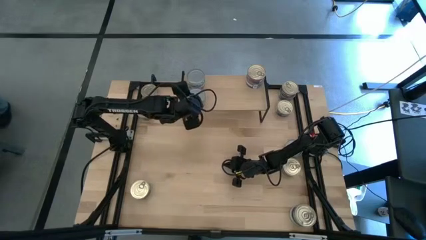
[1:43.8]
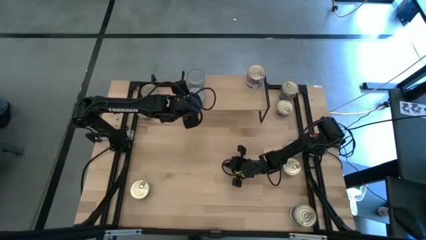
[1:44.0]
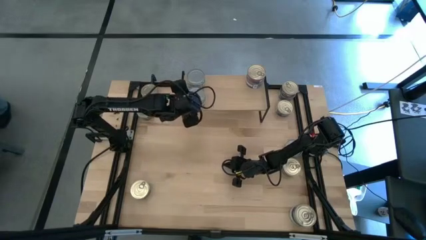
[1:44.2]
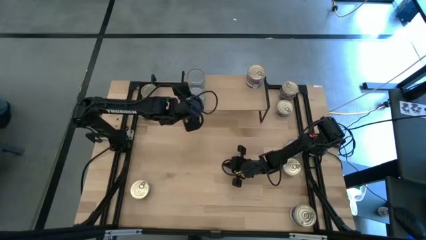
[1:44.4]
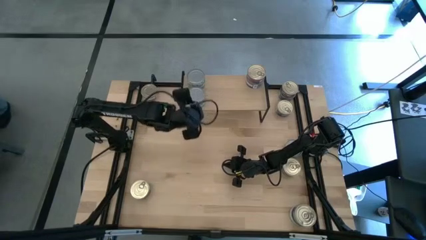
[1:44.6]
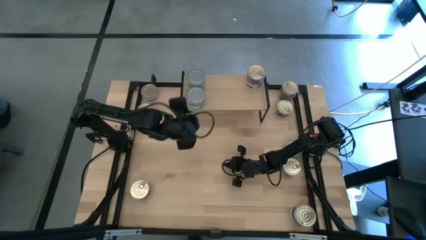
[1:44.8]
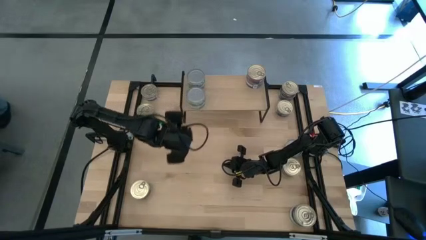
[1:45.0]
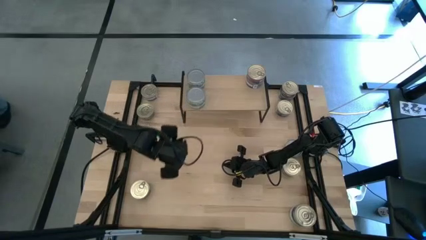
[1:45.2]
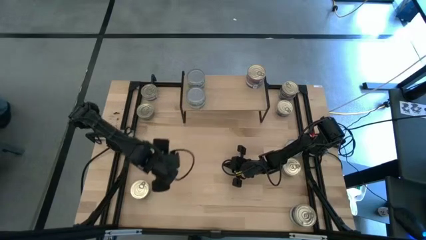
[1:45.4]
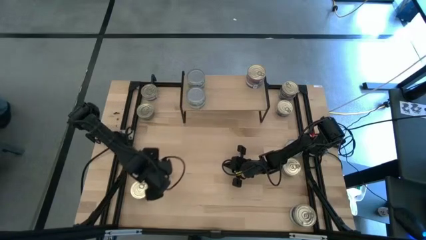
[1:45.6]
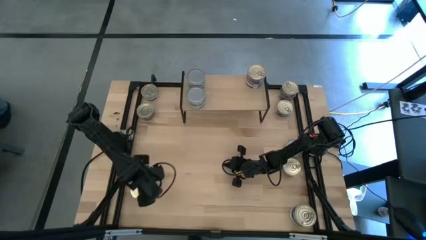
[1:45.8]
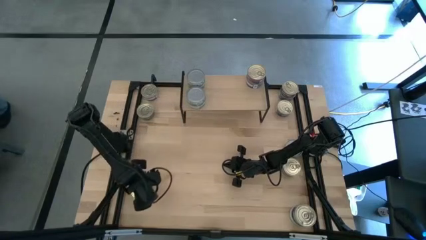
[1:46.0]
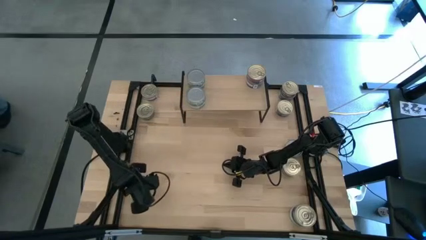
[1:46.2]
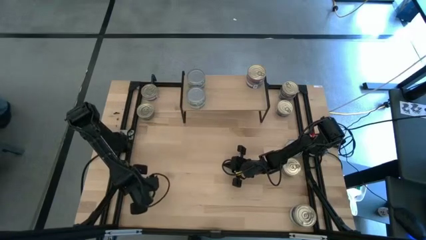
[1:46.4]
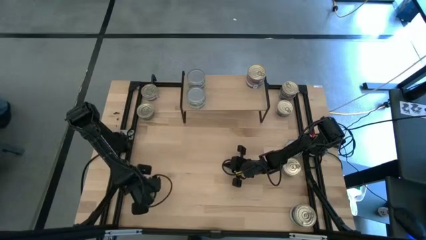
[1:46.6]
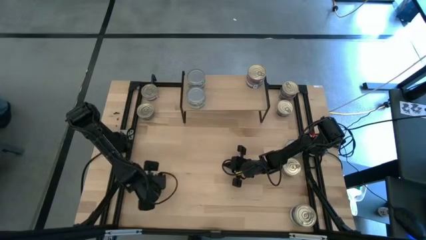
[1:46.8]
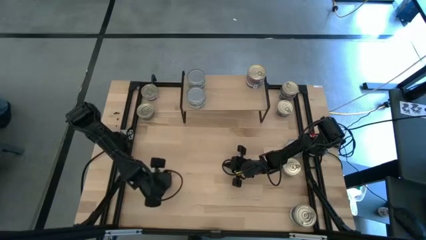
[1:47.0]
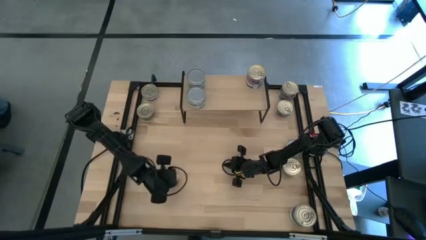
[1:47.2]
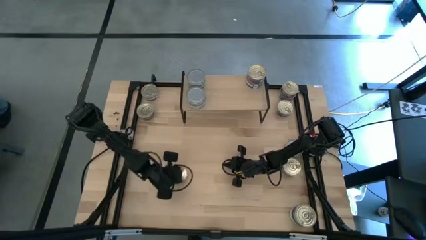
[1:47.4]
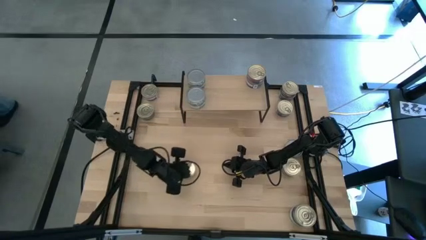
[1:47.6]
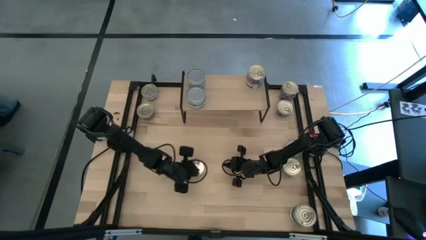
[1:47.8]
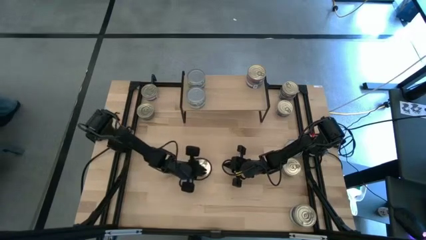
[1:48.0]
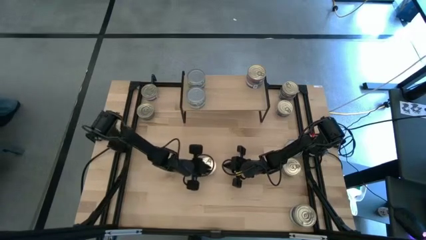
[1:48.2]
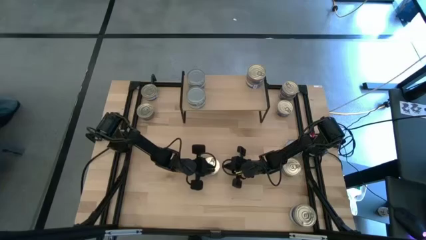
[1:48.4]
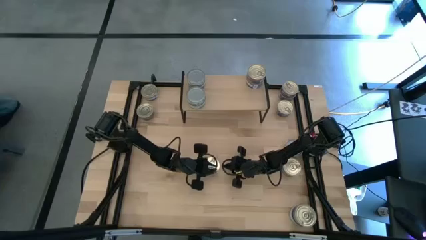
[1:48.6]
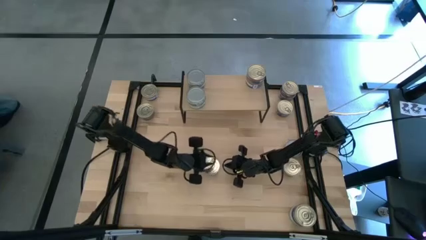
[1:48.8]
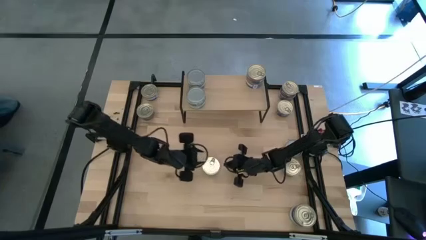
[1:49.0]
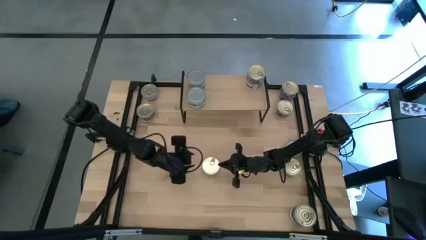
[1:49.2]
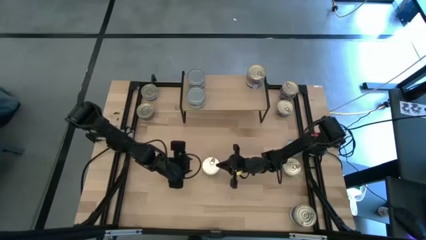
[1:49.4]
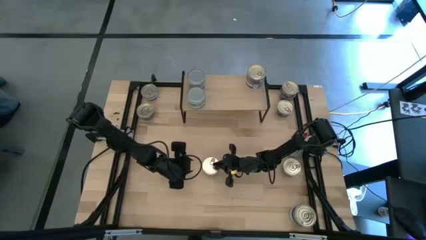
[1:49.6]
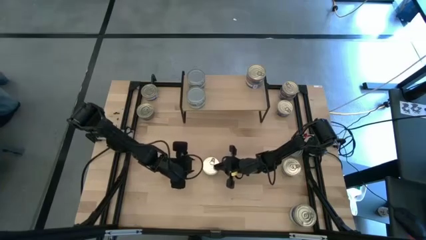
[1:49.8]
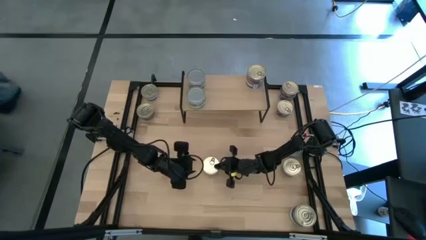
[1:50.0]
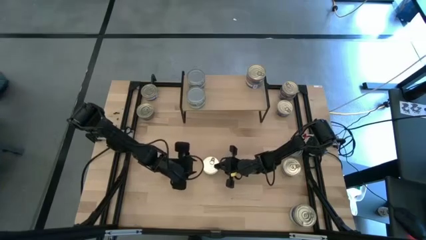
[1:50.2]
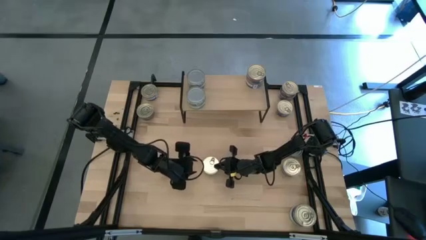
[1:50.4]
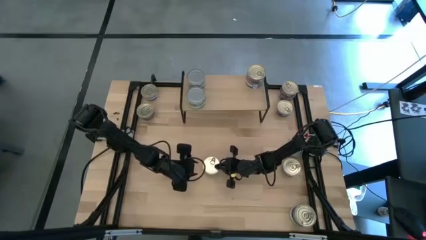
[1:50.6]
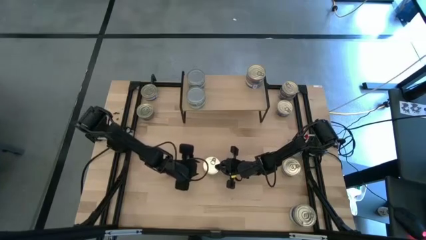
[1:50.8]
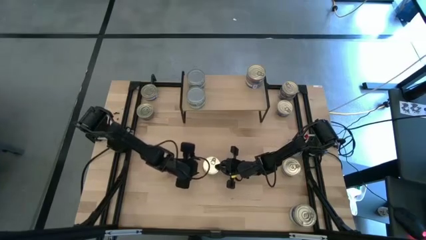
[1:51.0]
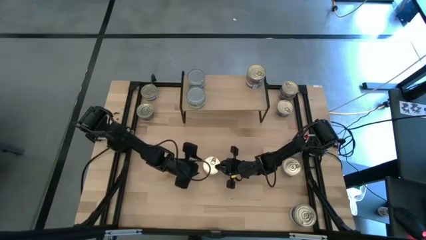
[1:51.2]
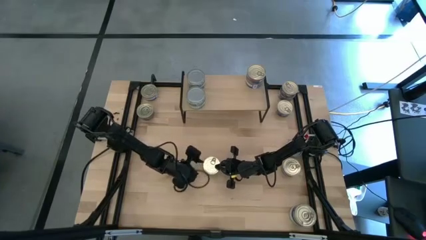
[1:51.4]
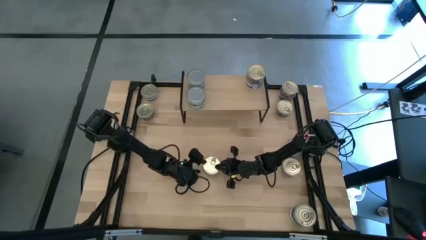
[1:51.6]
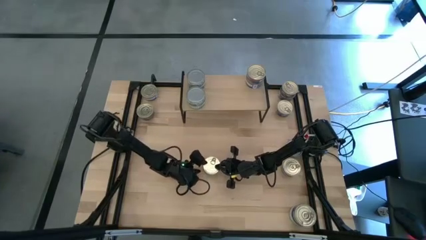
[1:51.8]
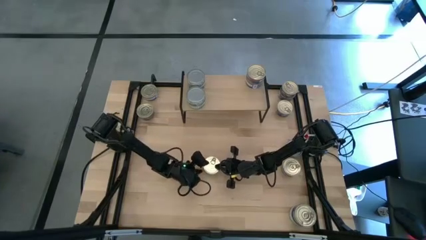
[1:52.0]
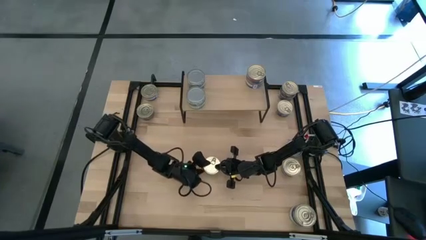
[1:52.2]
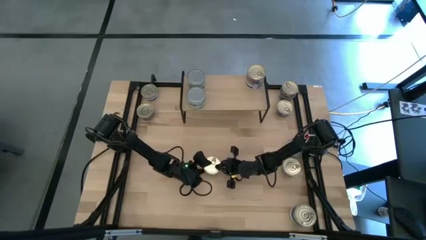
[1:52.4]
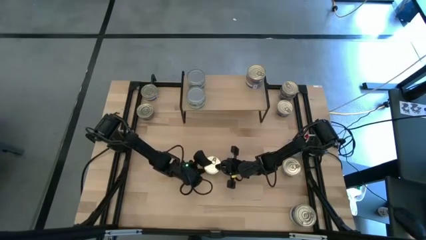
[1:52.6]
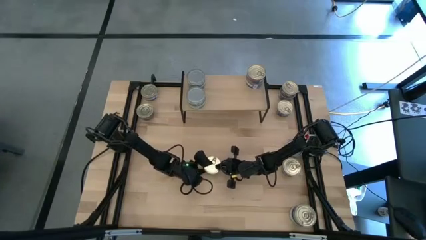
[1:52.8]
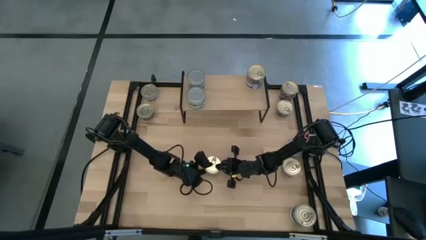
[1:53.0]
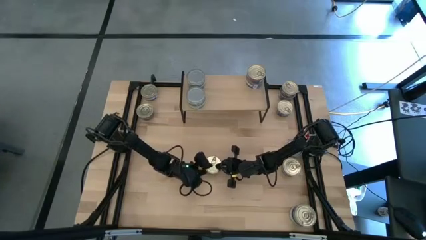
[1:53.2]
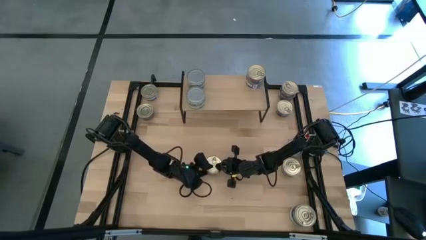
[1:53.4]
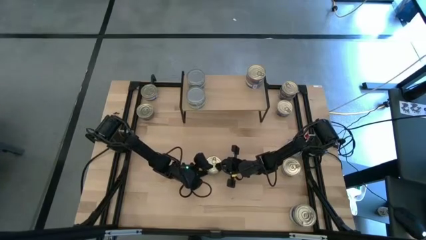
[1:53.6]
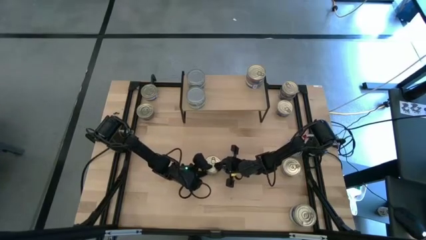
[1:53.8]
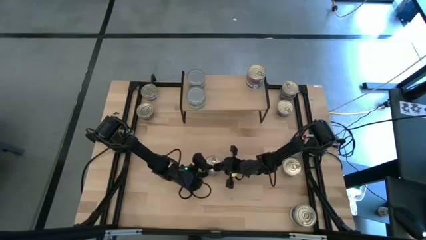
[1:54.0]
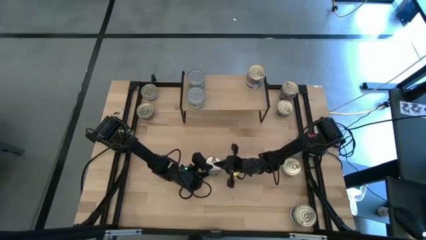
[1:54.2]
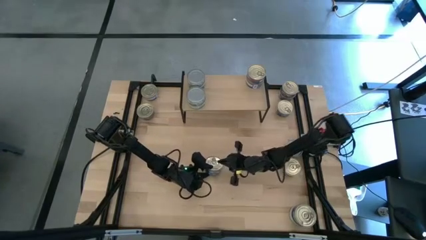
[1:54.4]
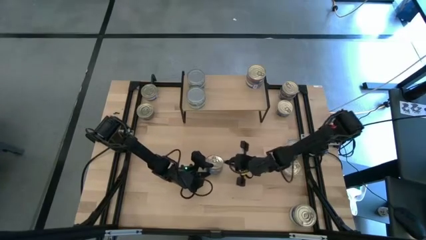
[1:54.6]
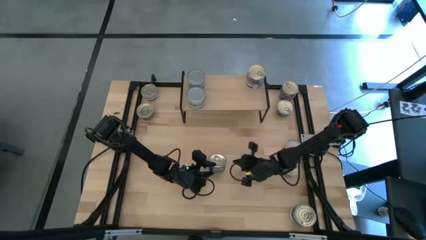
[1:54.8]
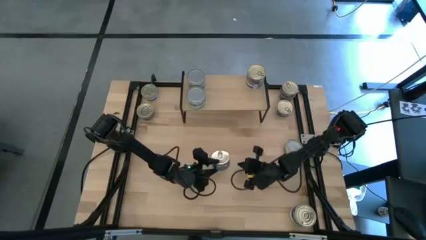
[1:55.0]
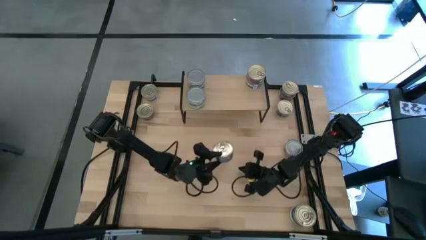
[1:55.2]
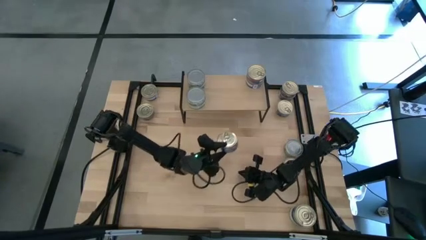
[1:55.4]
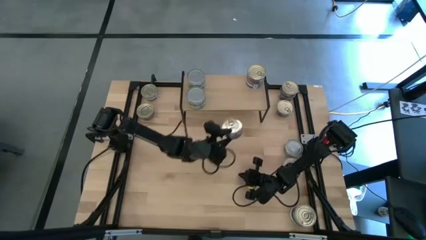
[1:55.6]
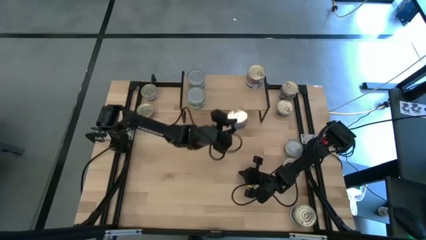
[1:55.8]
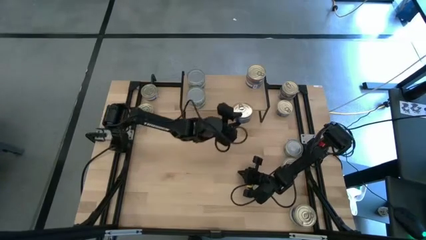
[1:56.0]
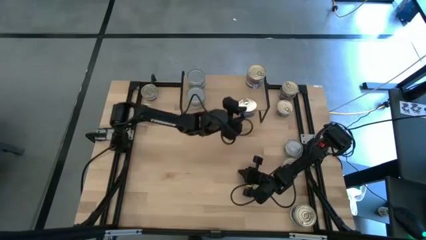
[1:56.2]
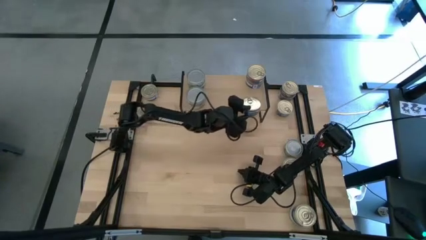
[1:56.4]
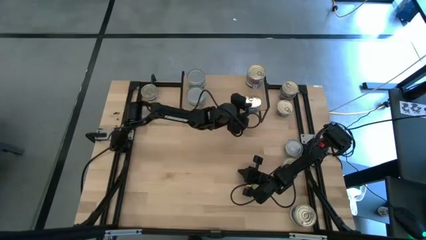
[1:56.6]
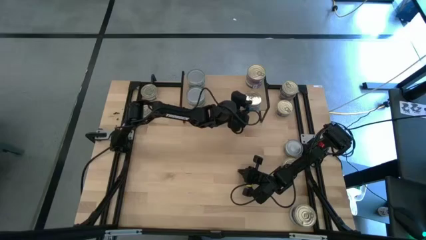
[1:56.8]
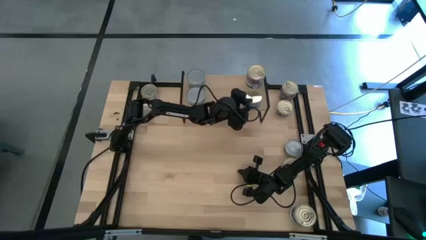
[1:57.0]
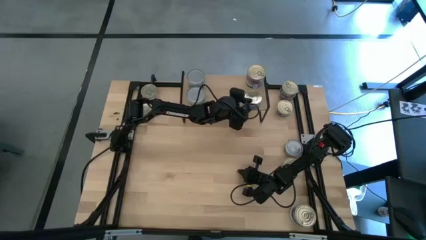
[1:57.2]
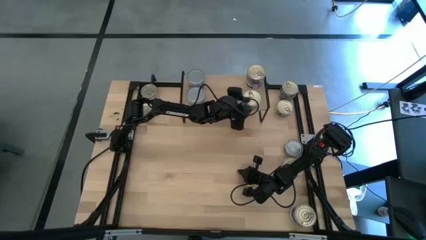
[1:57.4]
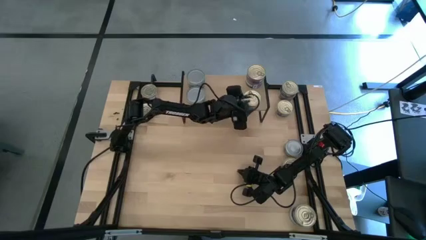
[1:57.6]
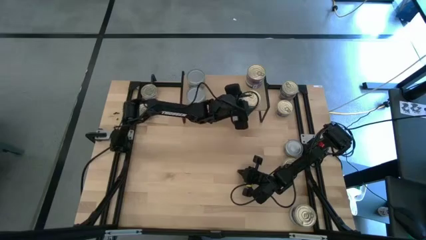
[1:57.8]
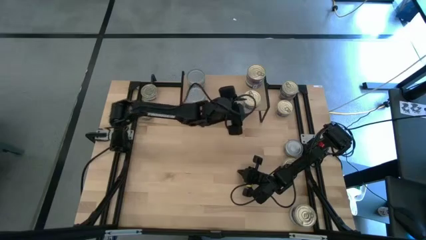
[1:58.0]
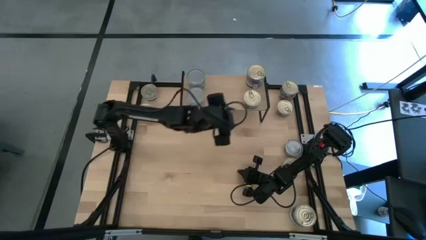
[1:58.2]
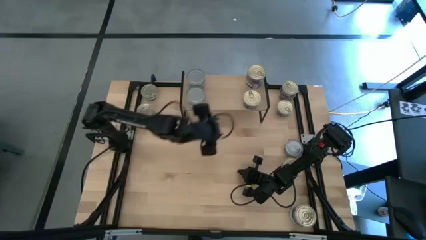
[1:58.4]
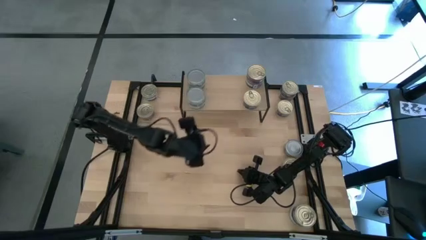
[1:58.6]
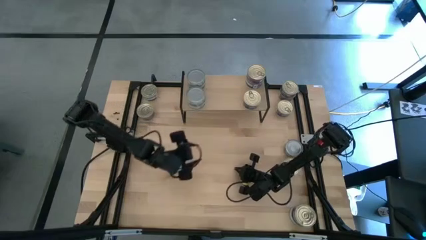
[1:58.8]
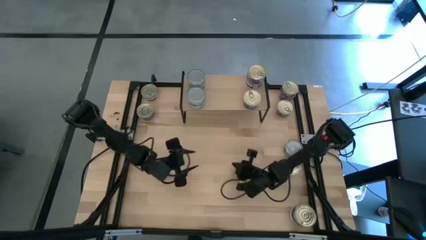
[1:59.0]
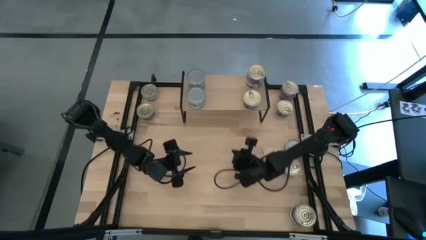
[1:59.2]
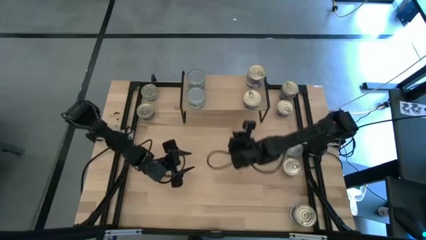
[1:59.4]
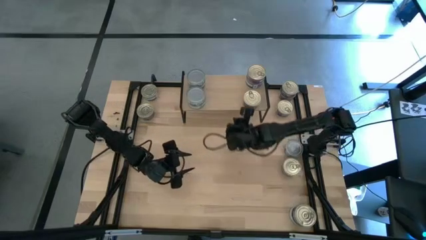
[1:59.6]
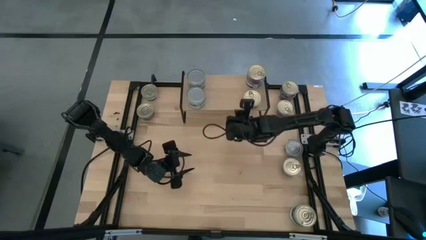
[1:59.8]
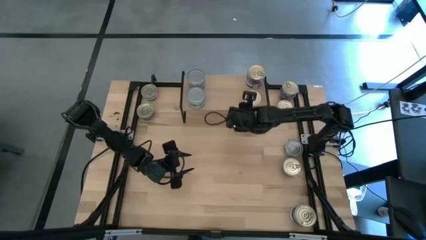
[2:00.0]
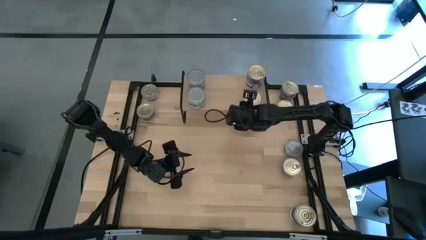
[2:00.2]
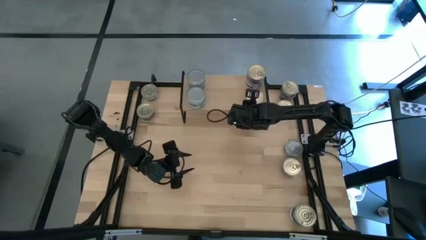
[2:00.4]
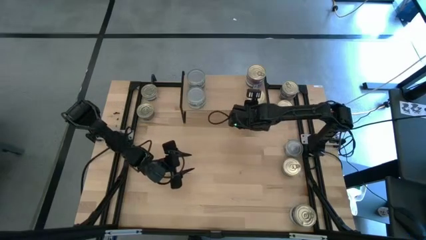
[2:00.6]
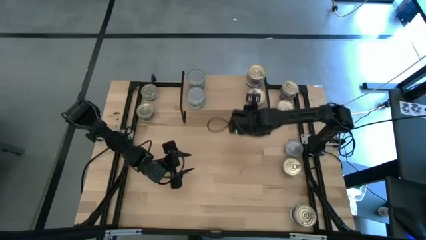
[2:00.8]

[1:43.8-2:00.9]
Task: Stack canned seafood by type on shelf
Put the blue pink tuna can on the shelf aligned with the other blue pink tuna can
